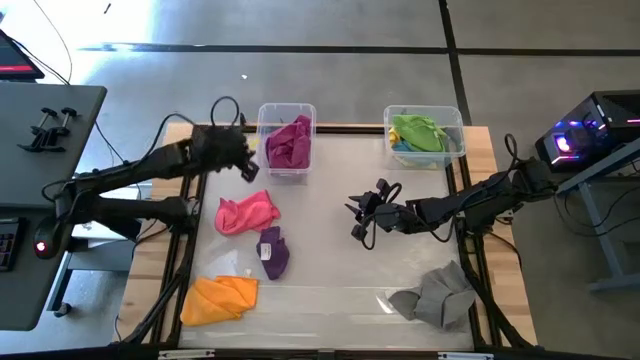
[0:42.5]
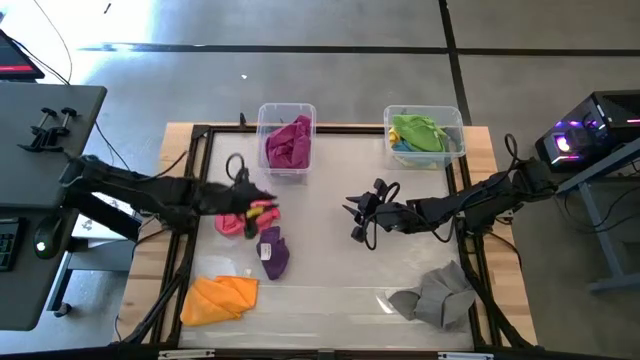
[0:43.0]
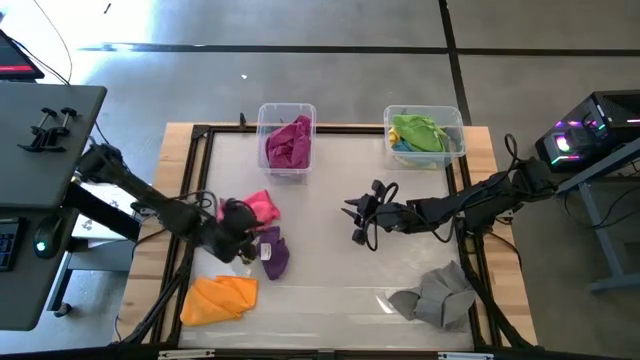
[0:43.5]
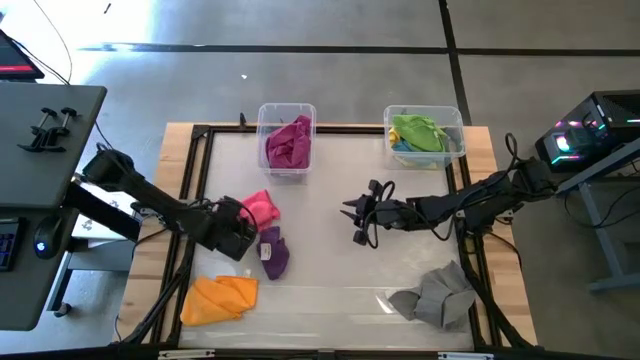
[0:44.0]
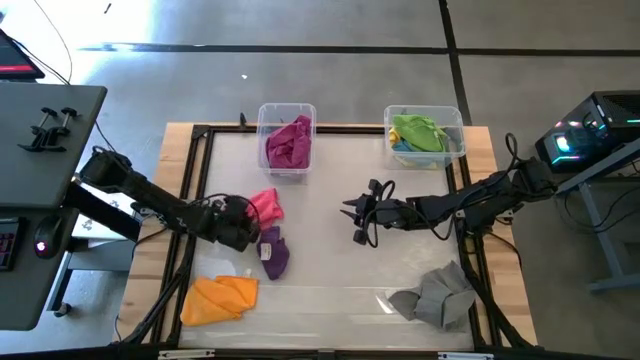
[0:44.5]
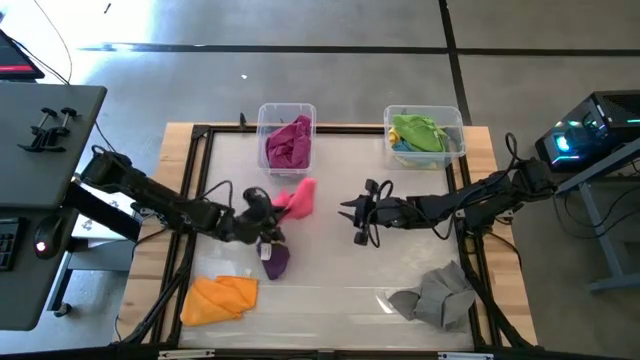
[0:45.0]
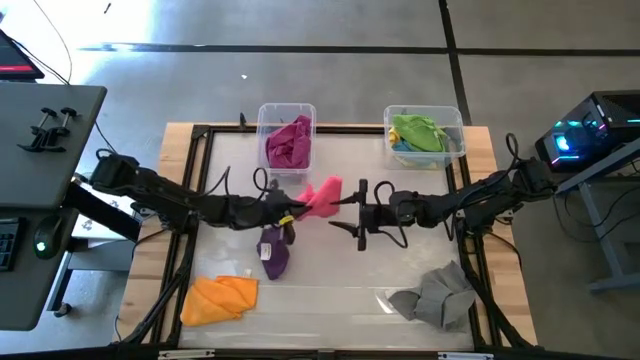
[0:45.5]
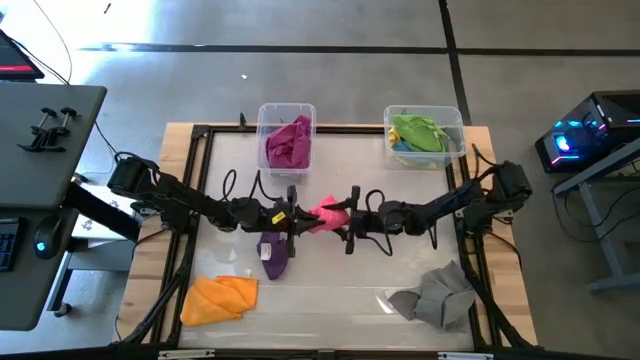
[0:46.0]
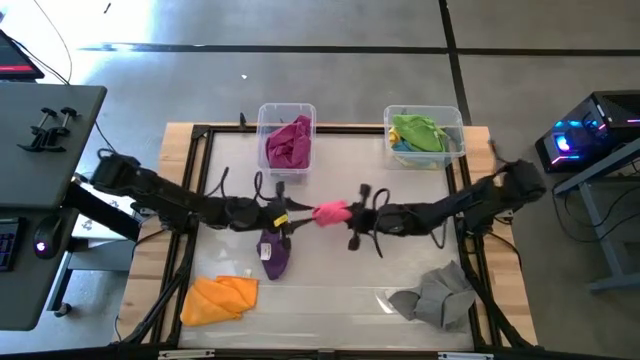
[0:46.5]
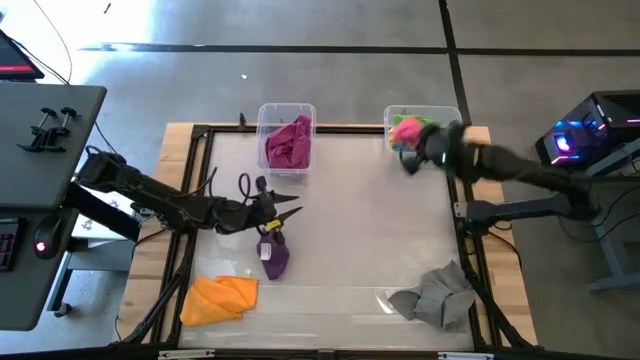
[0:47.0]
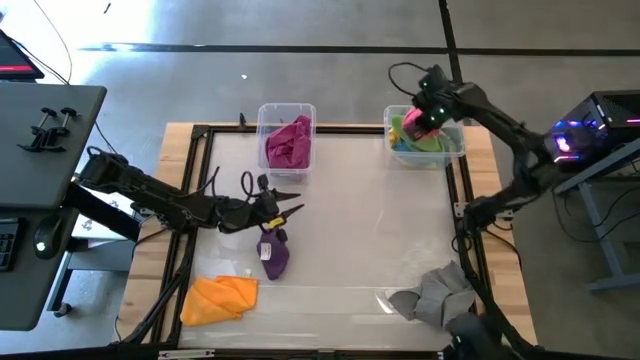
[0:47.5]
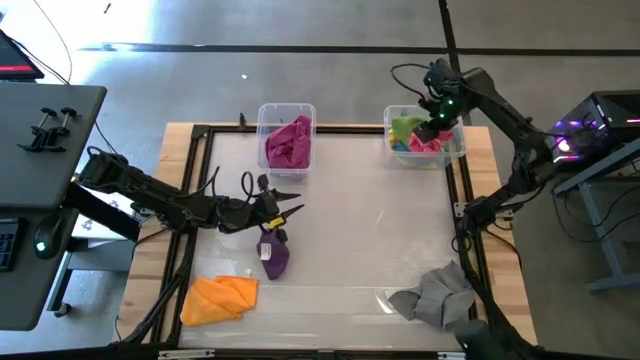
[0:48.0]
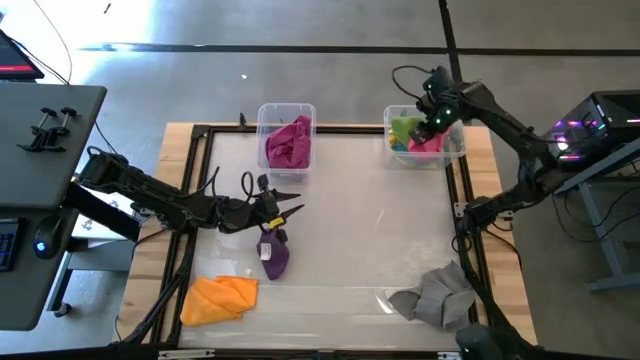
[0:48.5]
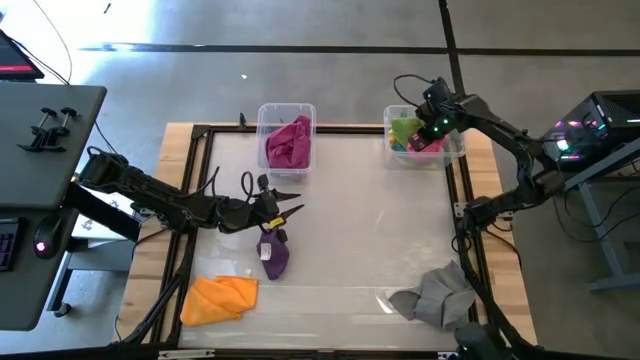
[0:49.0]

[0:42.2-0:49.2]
Task: Sort towels by color in basket
Put the pink towel into the right transparent bin

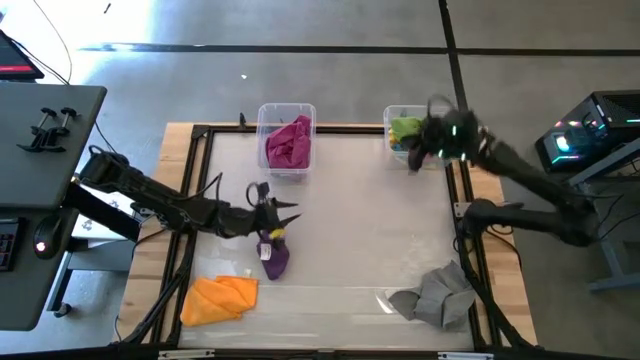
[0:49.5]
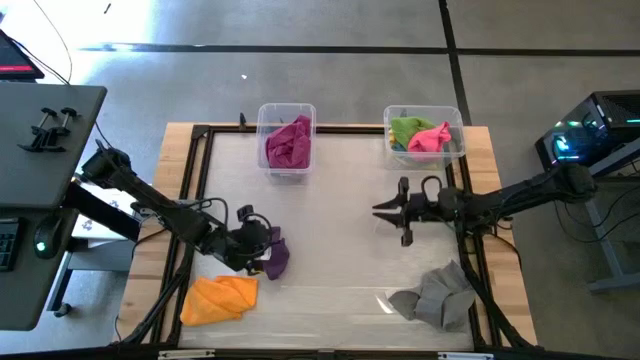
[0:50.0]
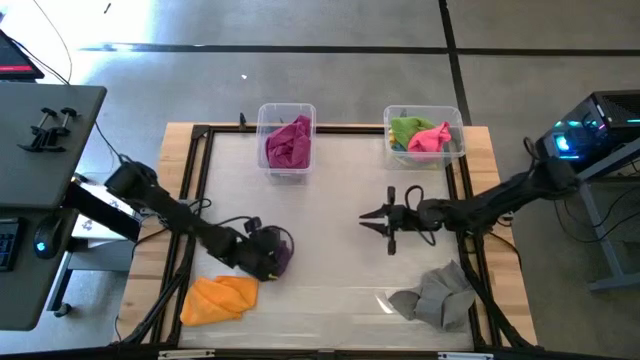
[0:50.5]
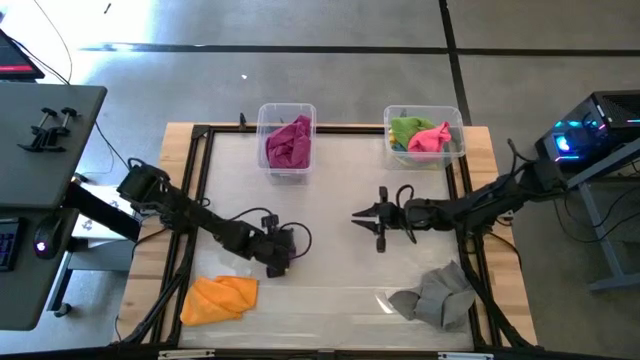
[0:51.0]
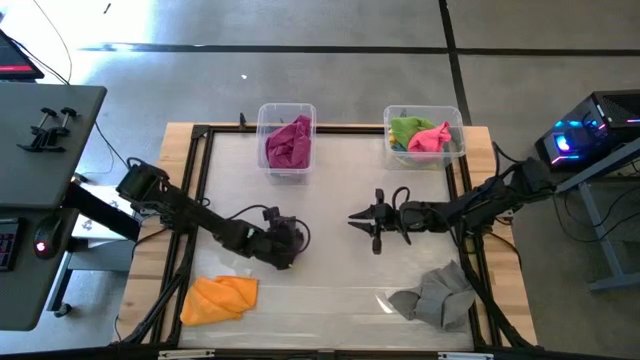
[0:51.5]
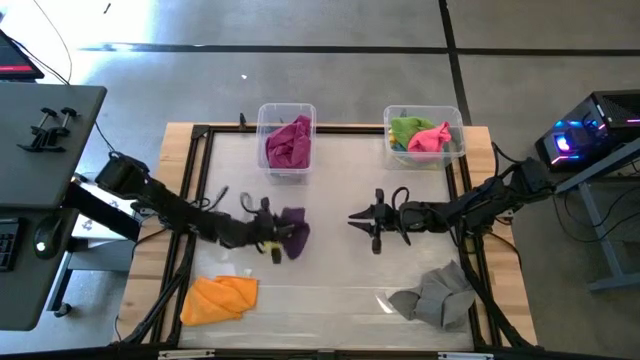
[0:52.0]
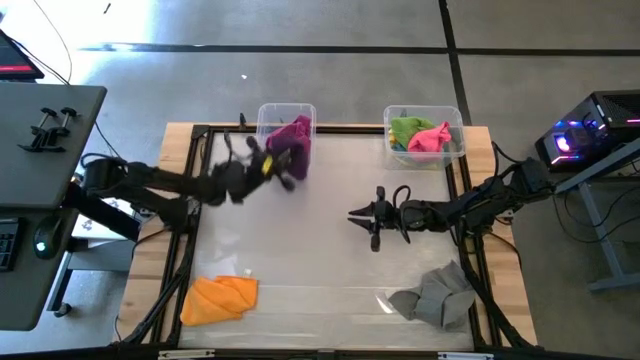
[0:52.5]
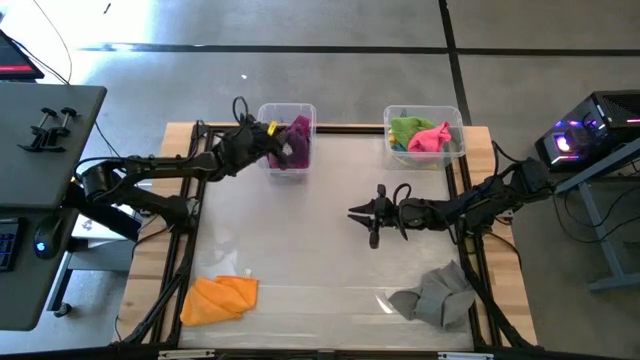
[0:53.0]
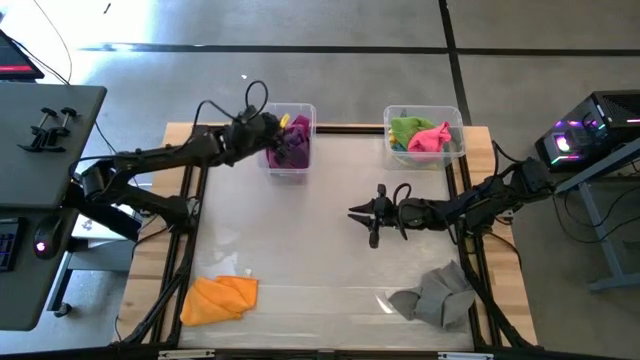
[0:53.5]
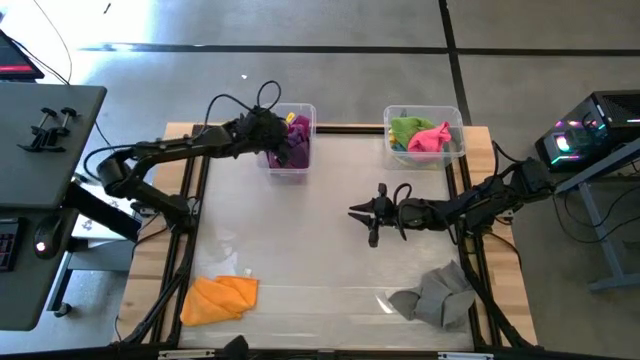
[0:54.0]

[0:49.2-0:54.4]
Put the violet towel into the left transparent bin

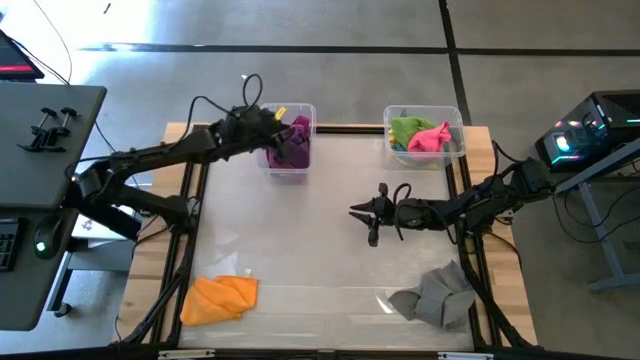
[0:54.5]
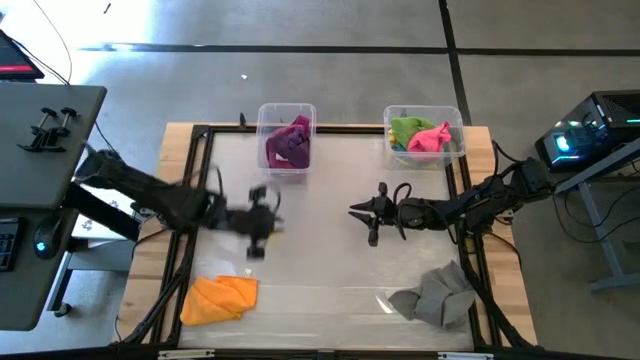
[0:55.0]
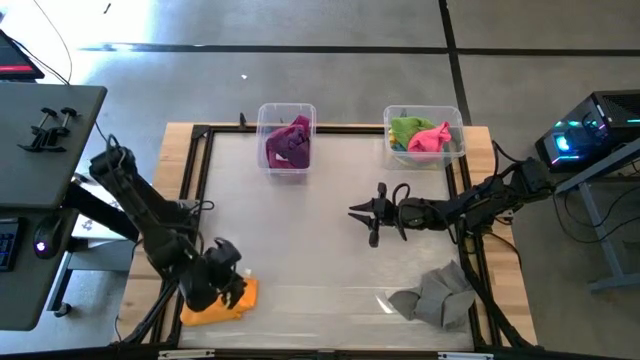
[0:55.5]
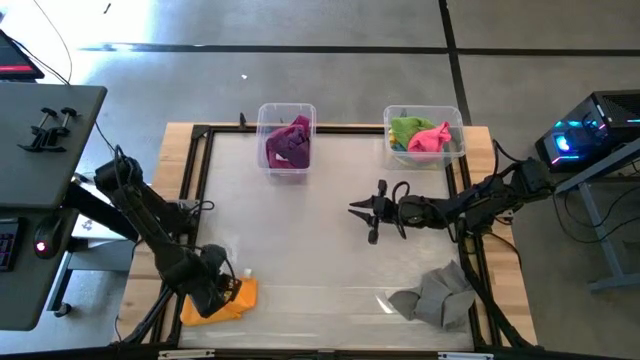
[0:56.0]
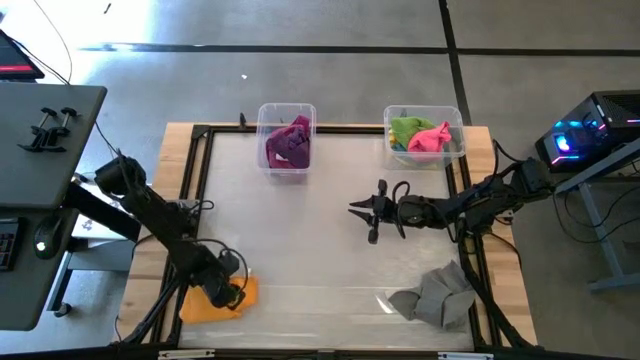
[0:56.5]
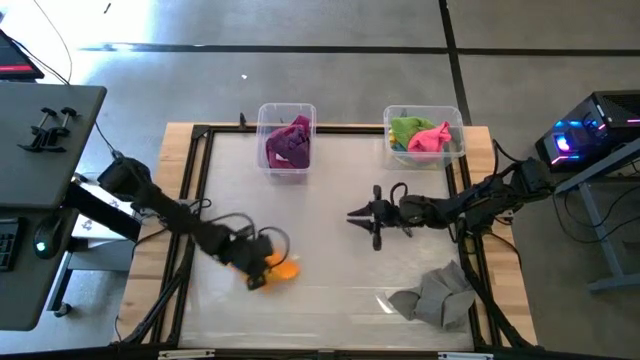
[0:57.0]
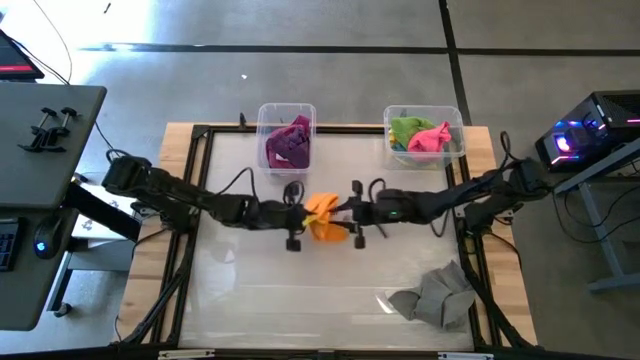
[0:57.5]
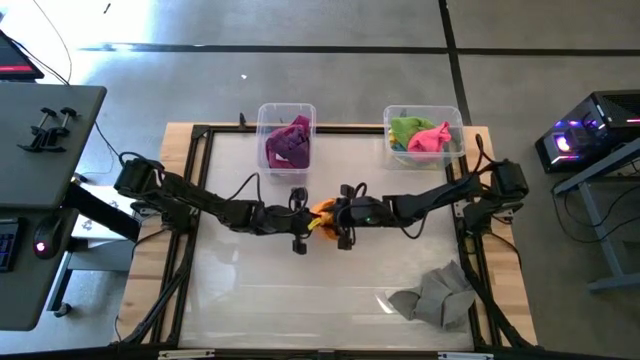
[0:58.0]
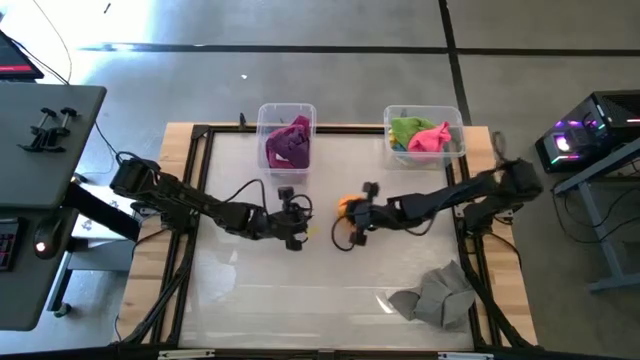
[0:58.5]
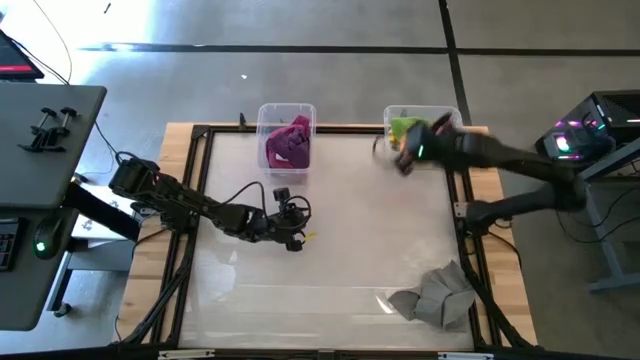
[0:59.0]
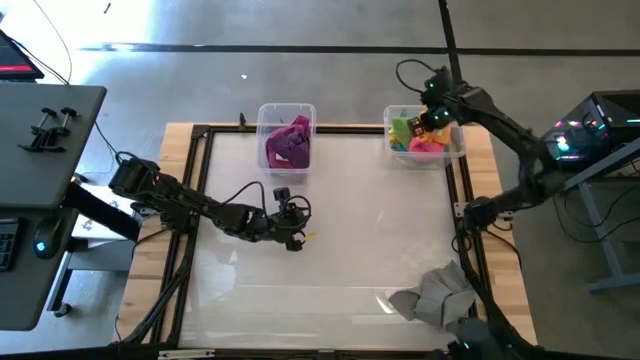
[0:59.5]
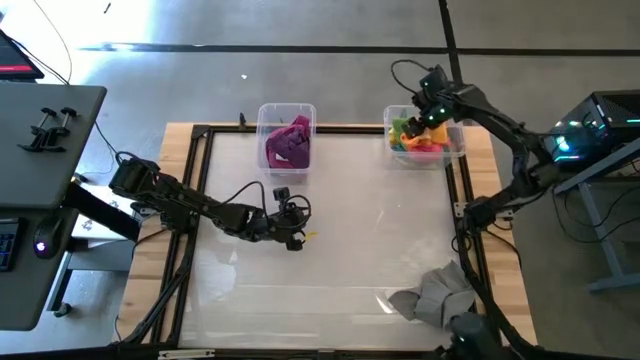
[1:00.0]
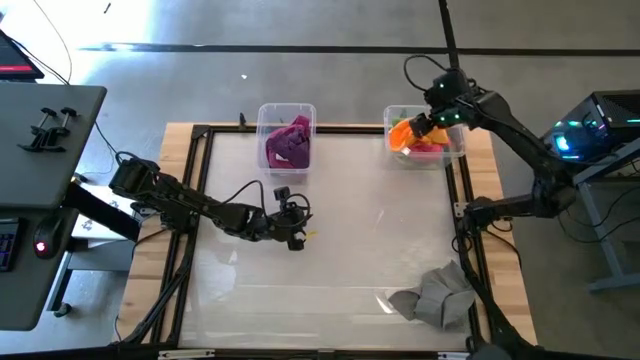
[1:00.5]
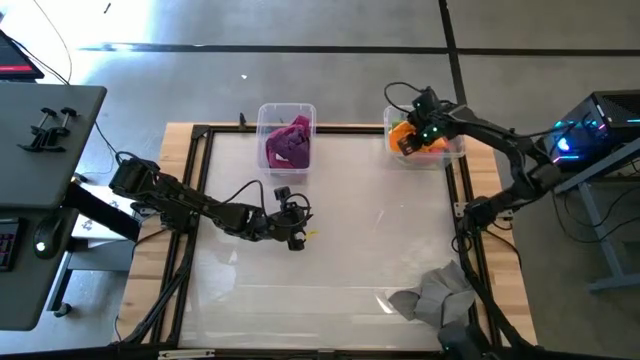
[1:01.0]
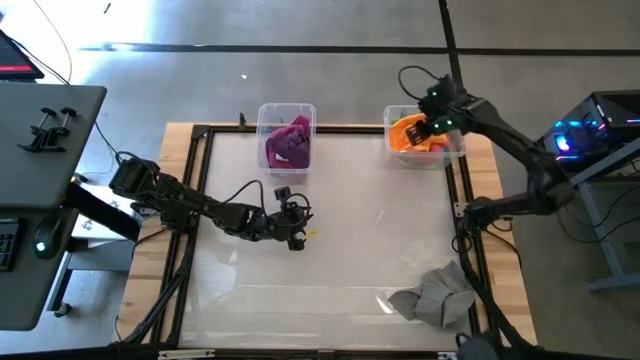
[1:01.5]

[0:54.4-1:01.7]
Put the orange towel into the right transparent bin
